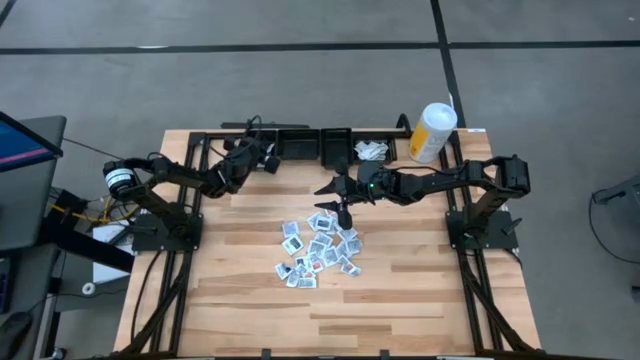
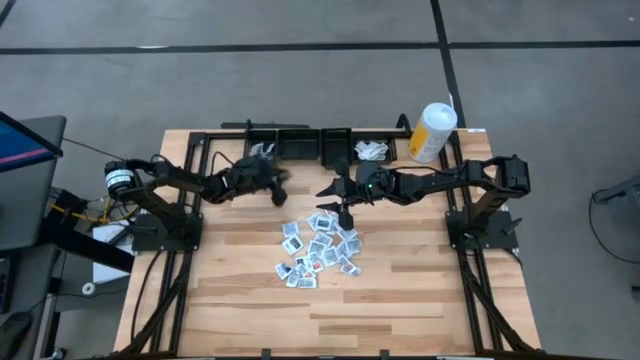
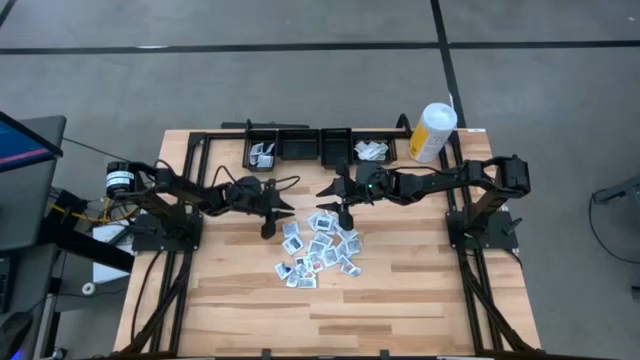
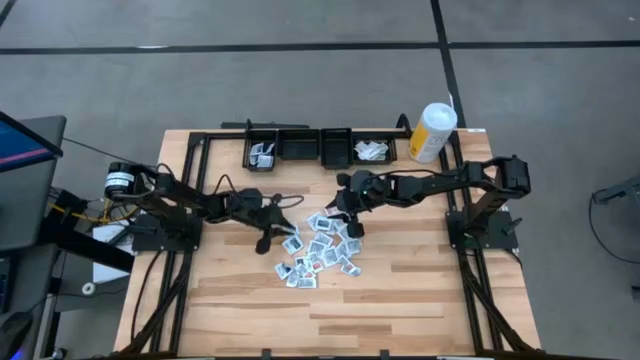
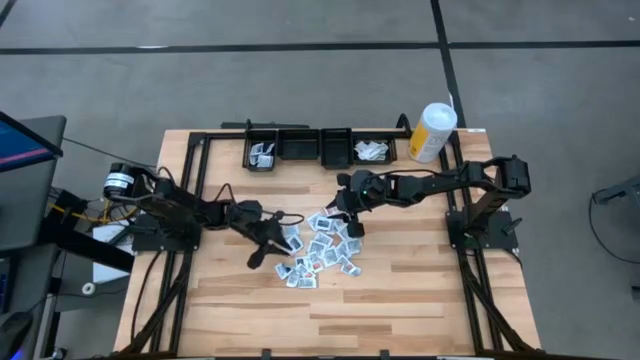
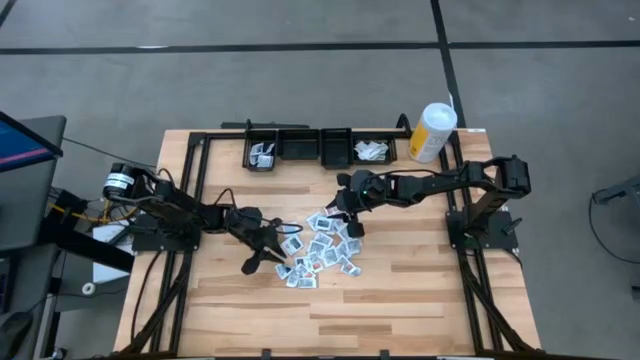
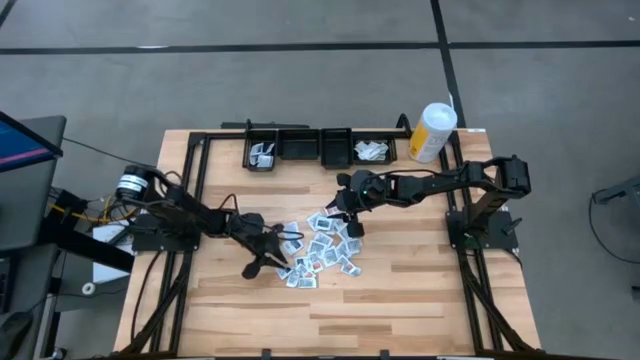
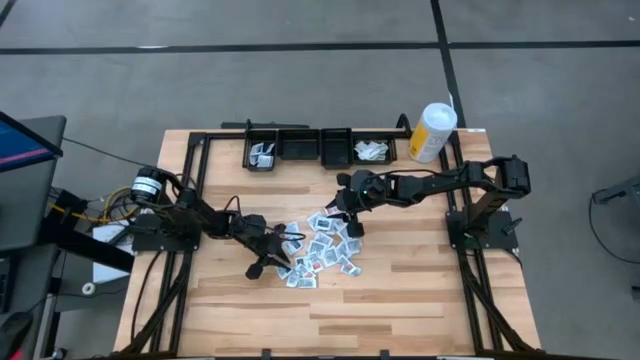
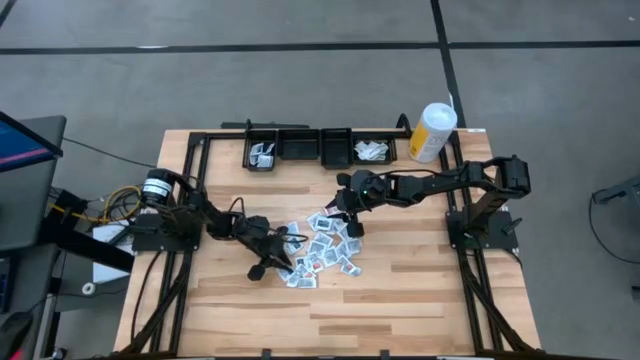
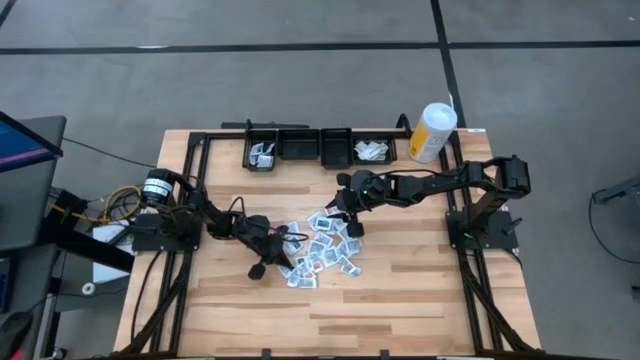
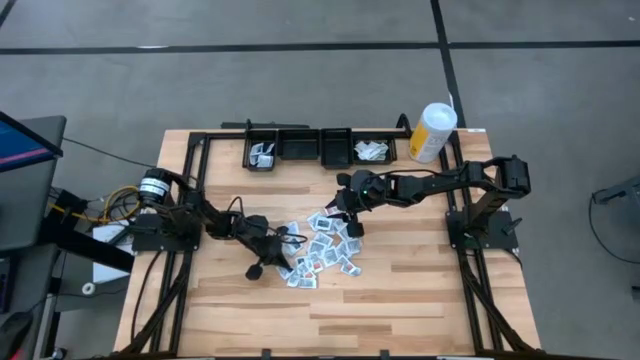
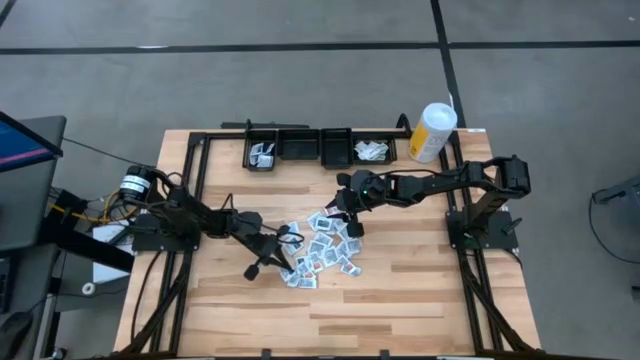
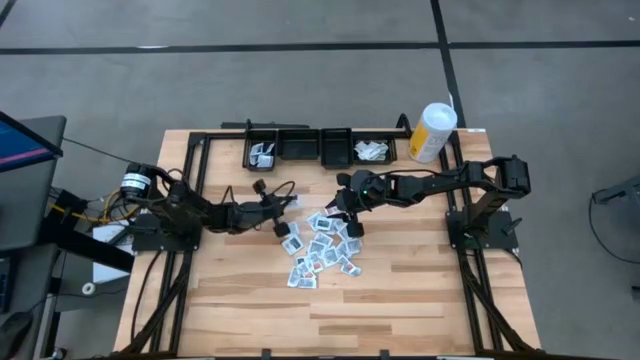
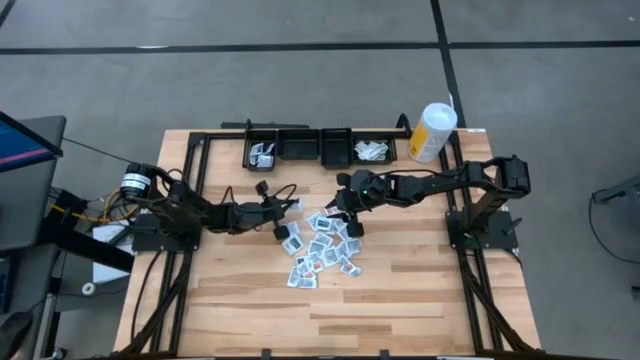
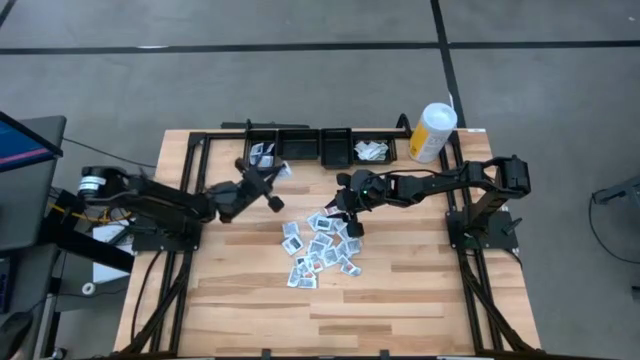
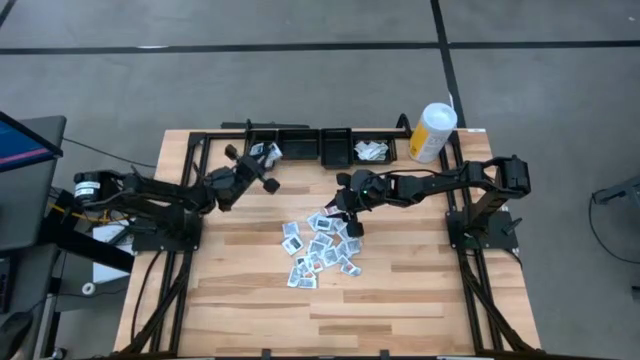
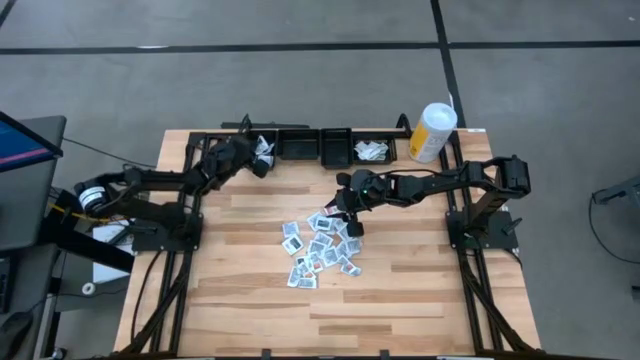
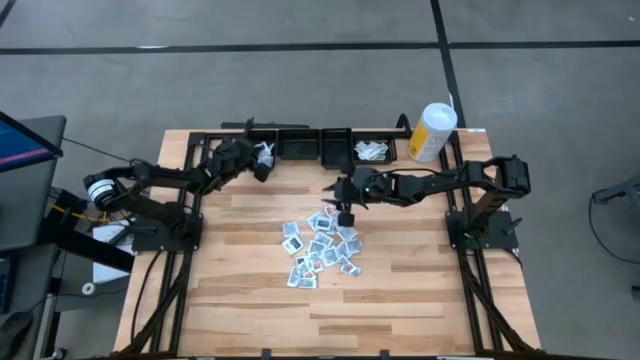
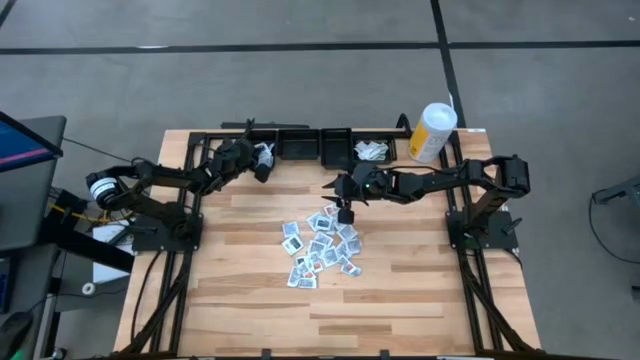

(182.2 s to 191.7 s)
Task: Pick & Place First Aid Supplies
Put the blue alcohol pad into the left black bin

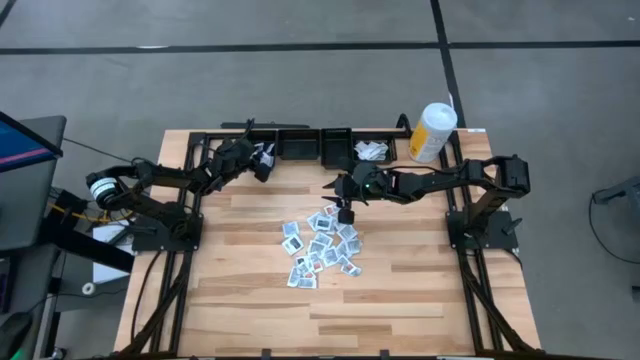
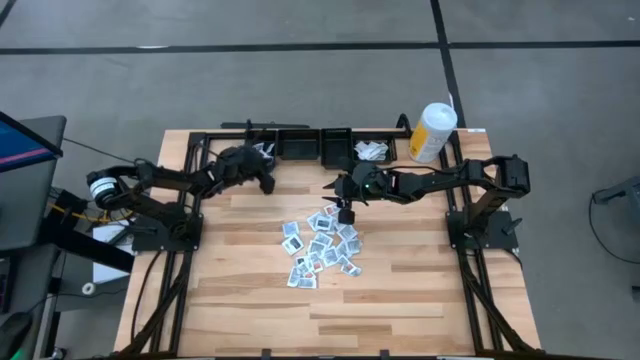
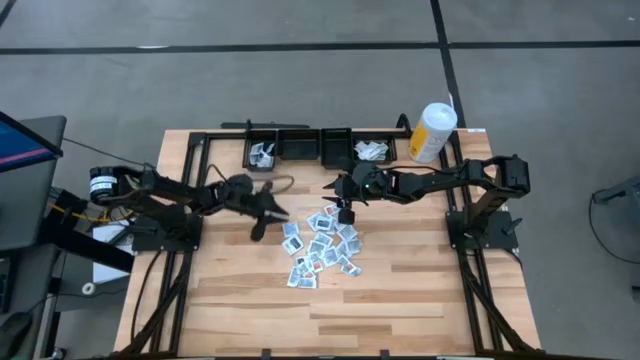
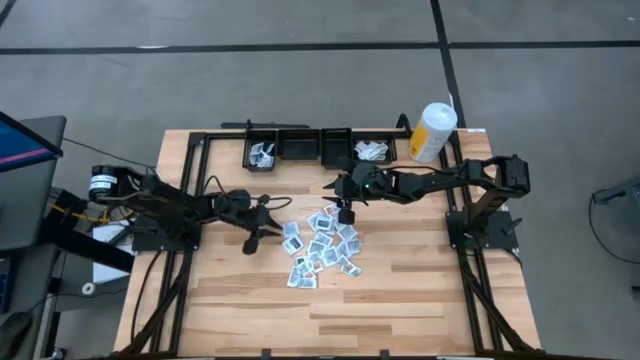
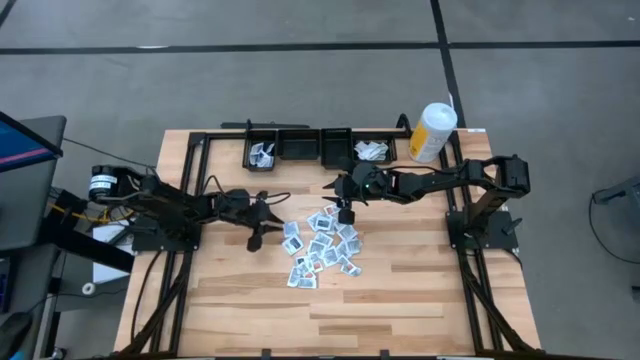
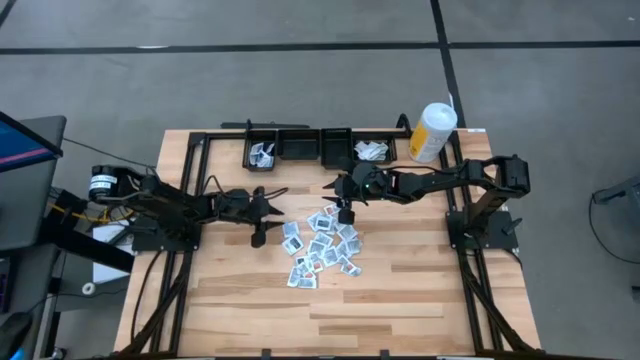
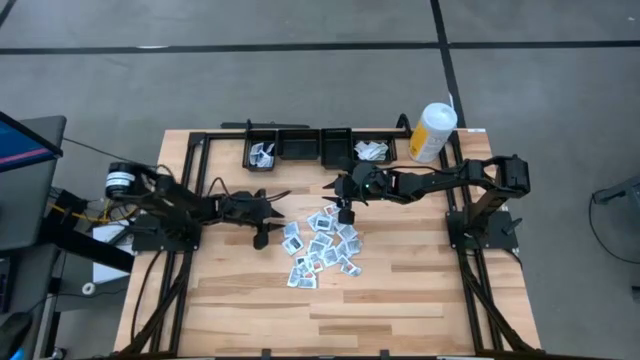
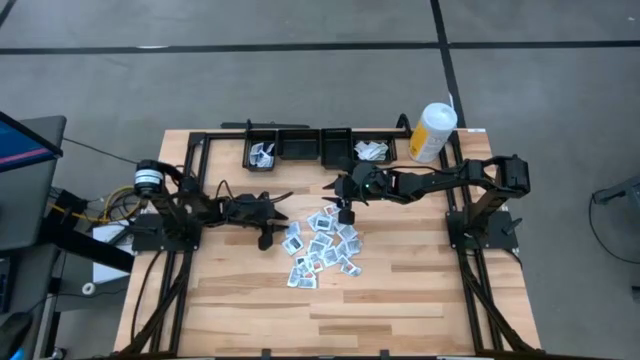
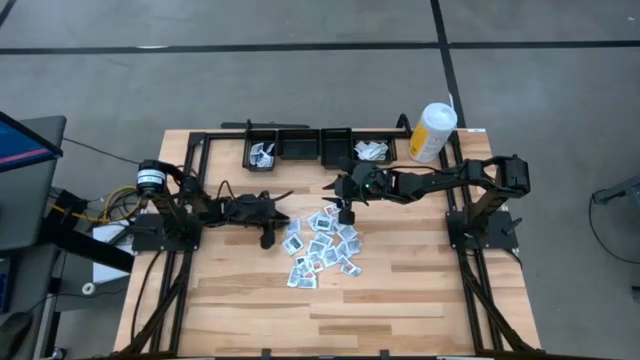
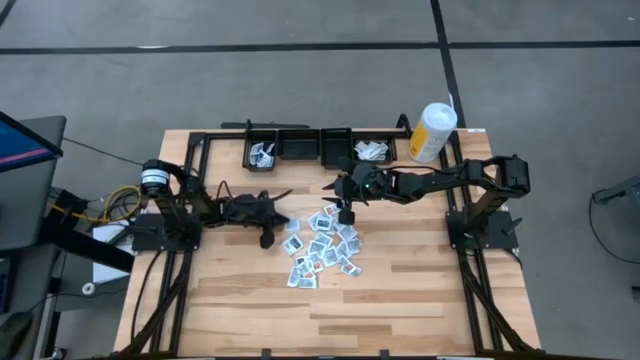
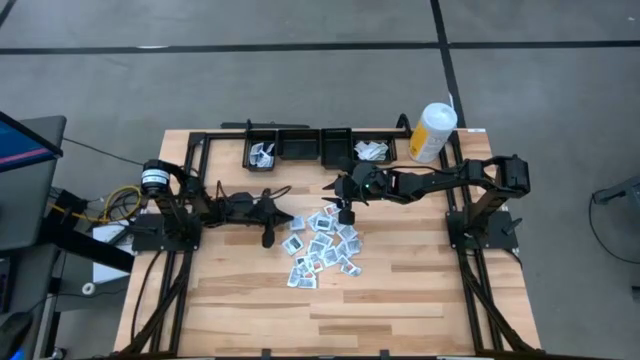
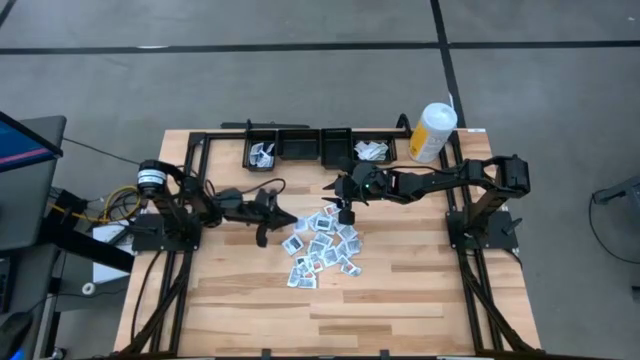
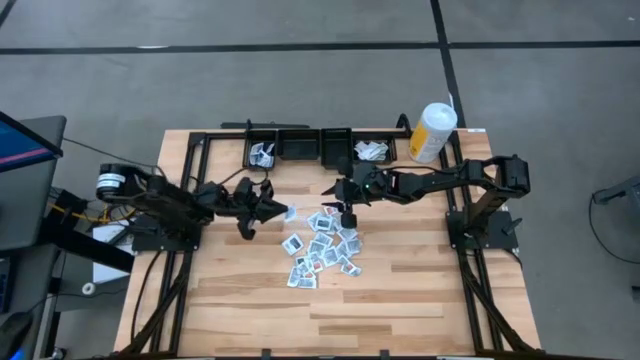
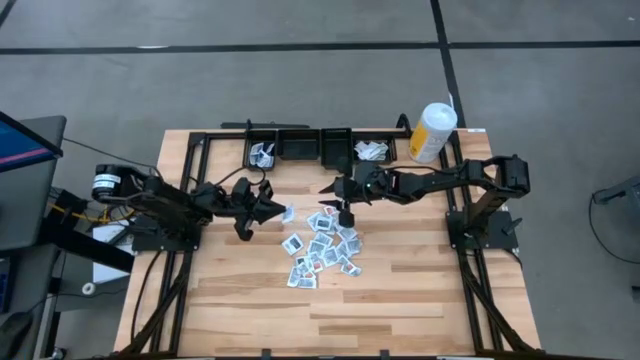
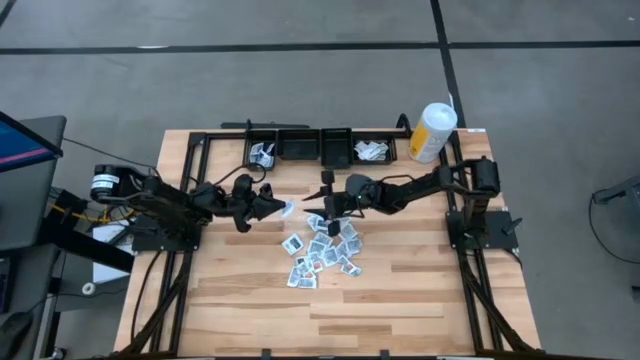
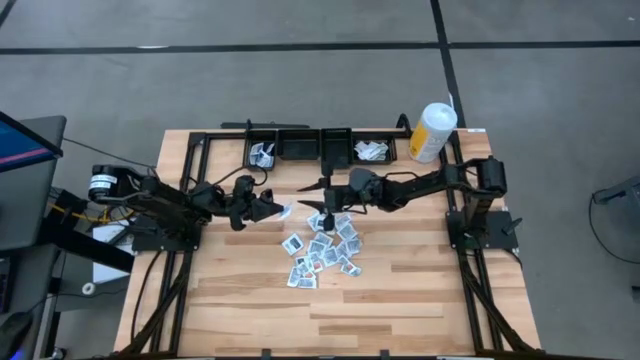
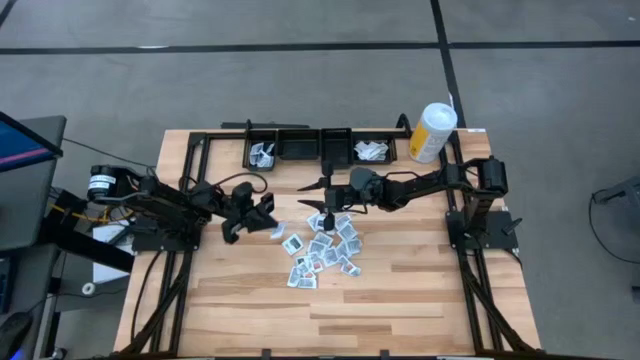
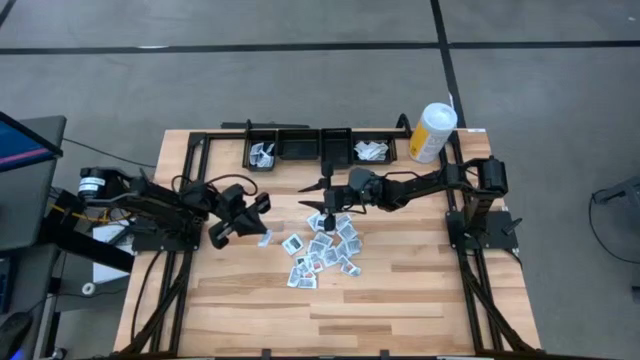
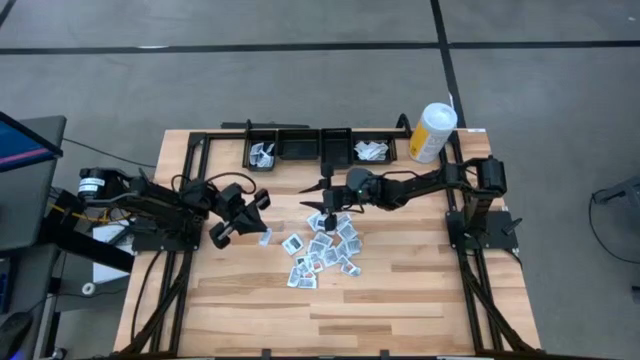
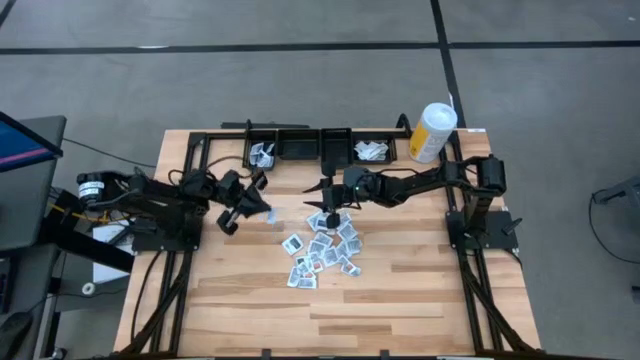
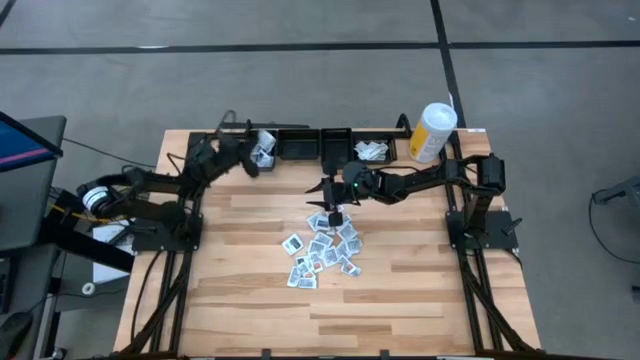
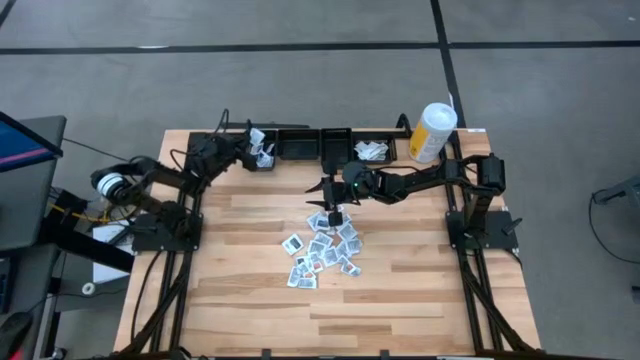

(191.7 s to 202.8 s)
Put the blue alcohol pad into the left black bin
